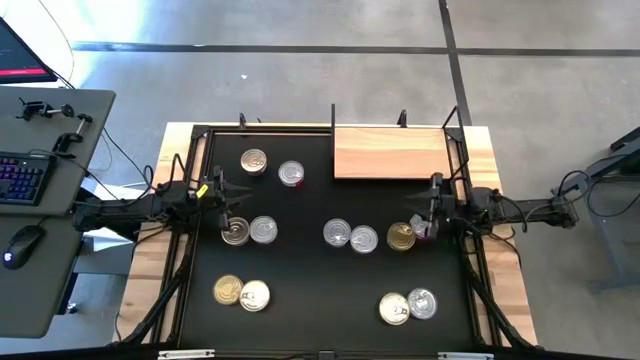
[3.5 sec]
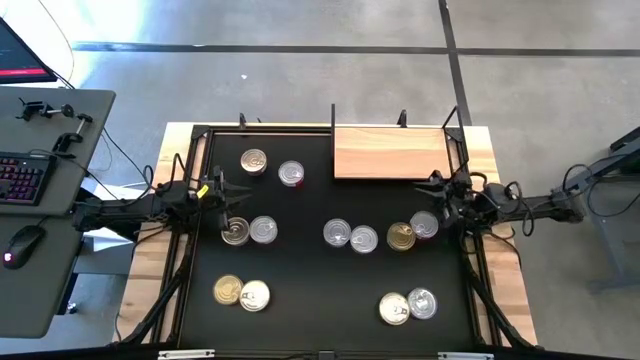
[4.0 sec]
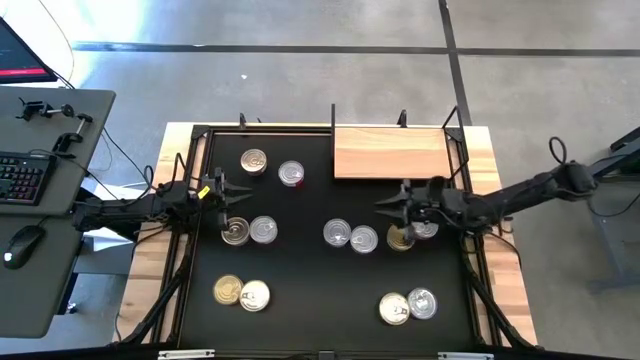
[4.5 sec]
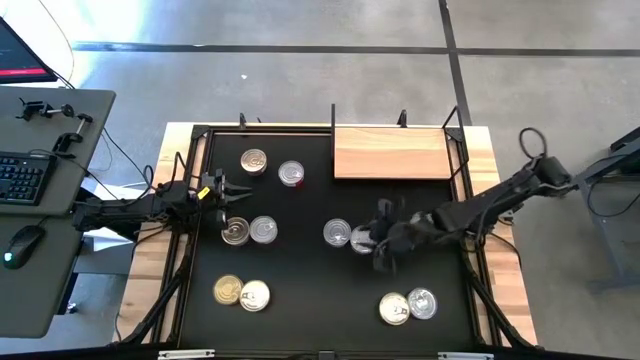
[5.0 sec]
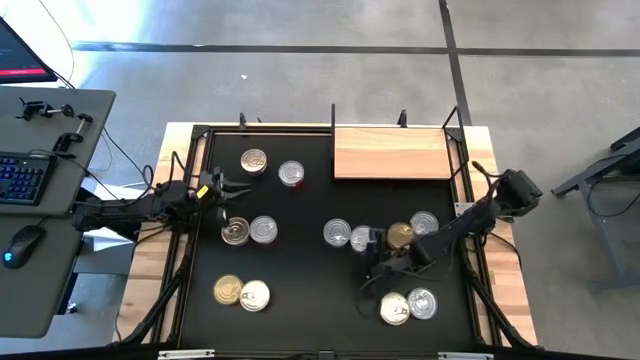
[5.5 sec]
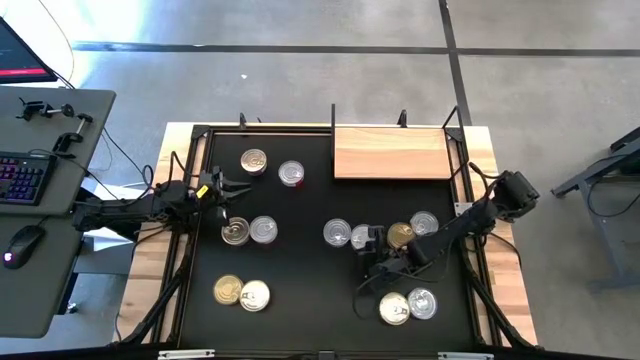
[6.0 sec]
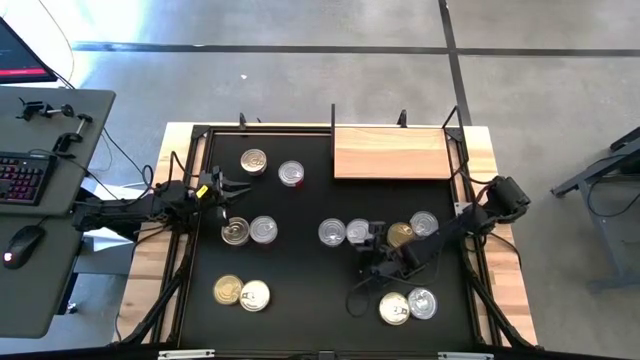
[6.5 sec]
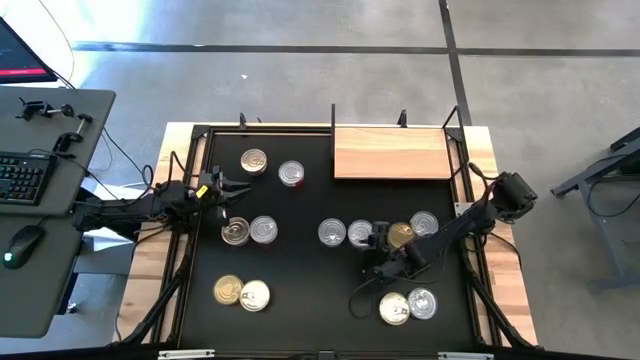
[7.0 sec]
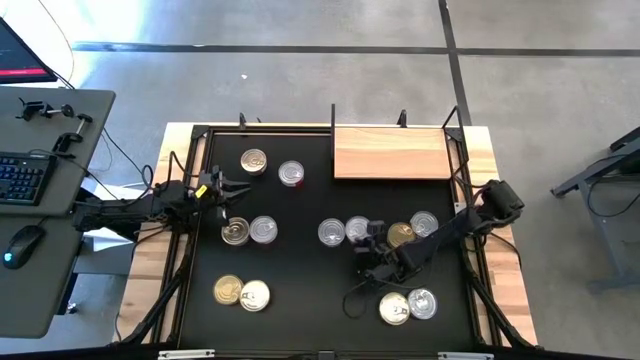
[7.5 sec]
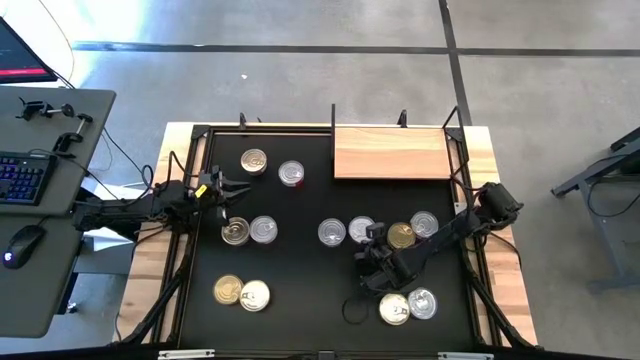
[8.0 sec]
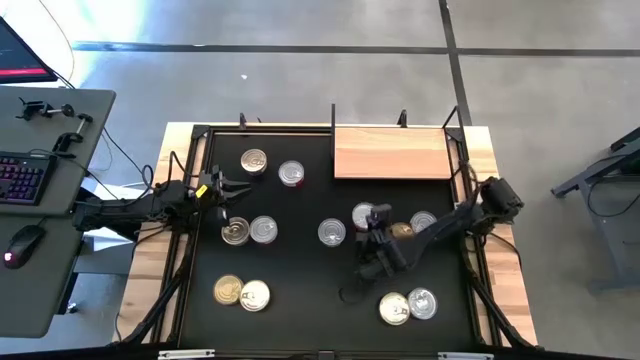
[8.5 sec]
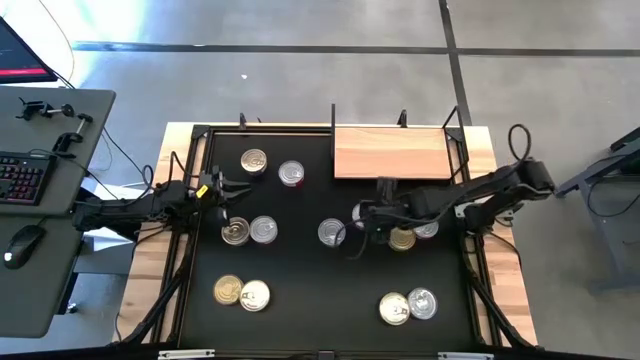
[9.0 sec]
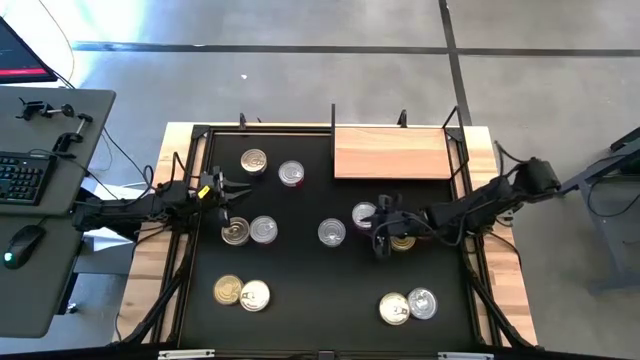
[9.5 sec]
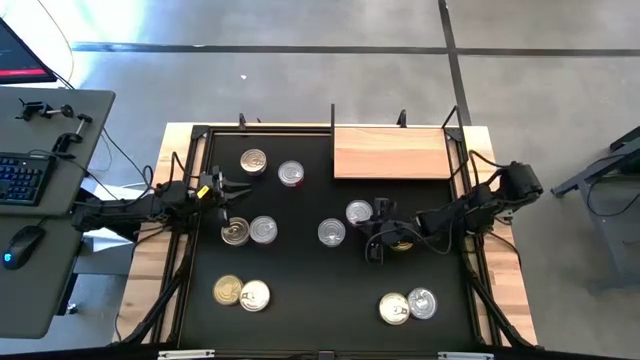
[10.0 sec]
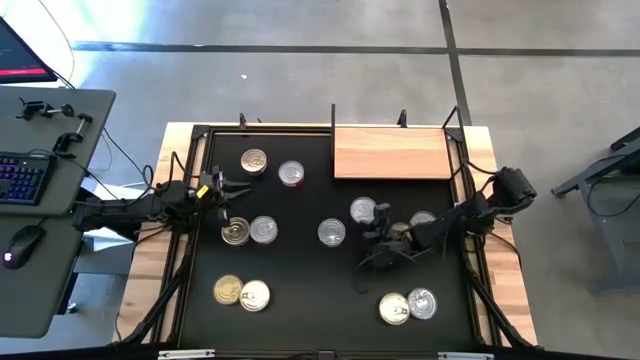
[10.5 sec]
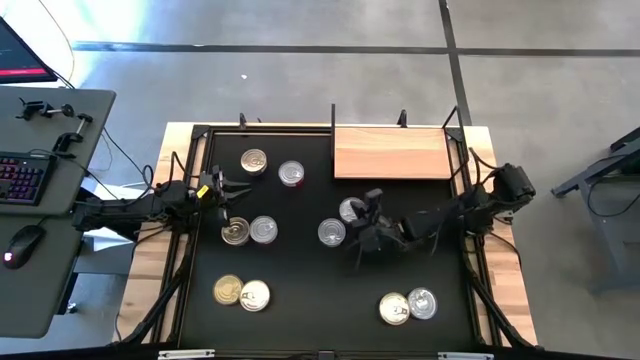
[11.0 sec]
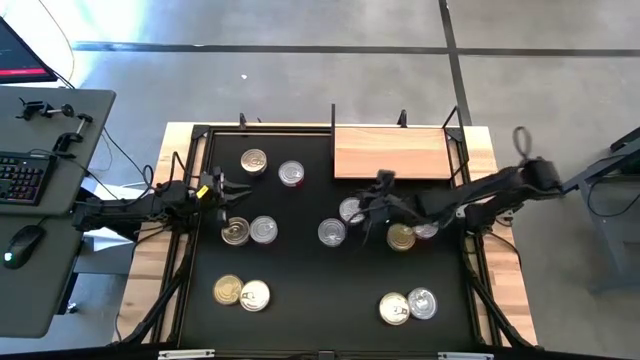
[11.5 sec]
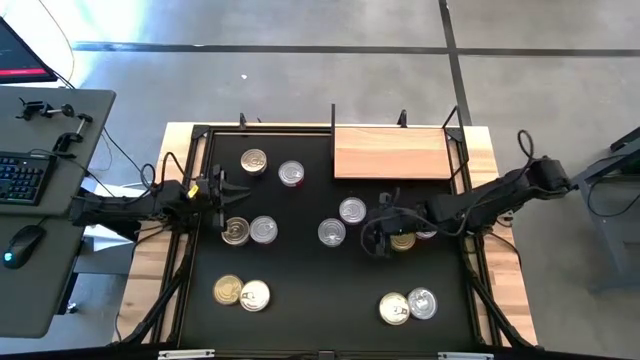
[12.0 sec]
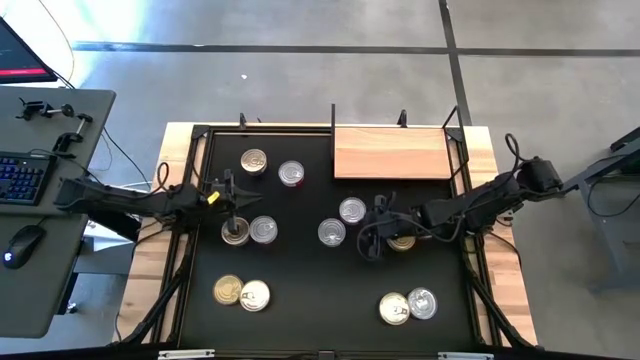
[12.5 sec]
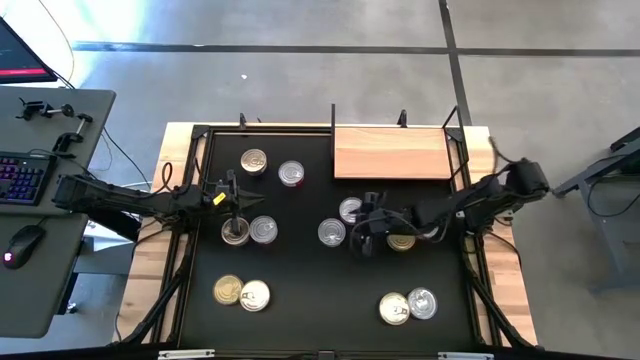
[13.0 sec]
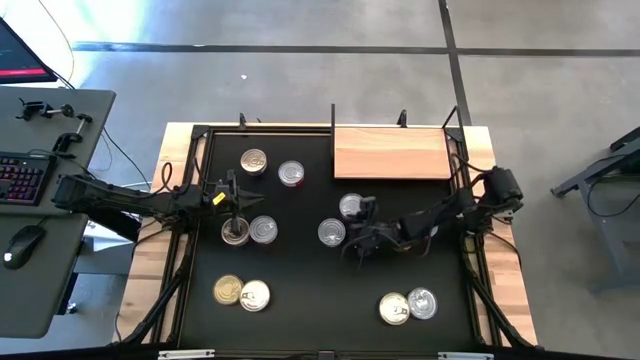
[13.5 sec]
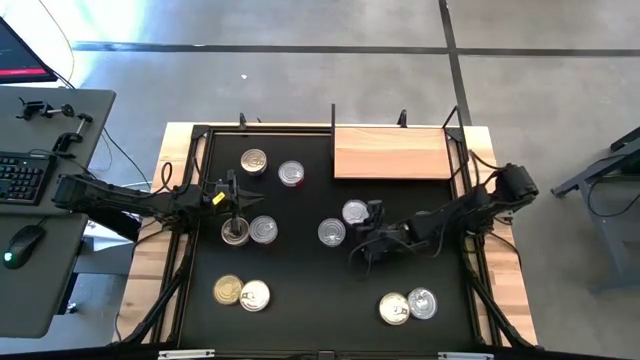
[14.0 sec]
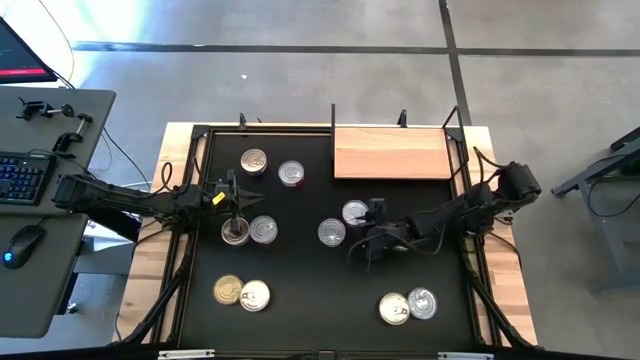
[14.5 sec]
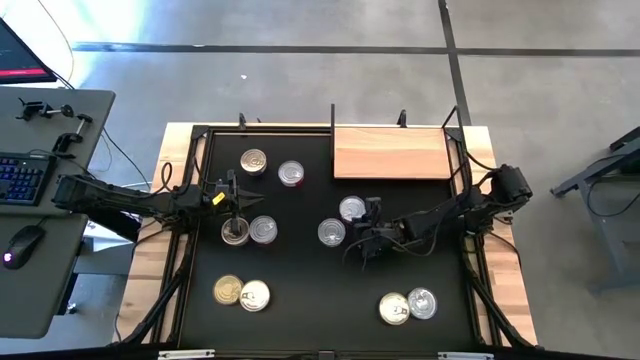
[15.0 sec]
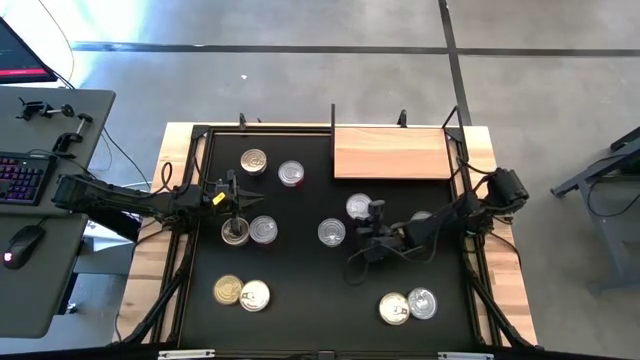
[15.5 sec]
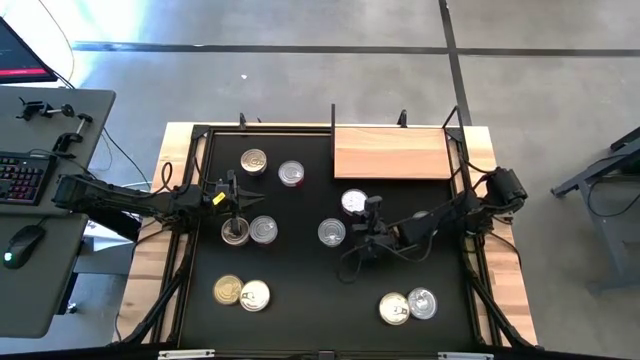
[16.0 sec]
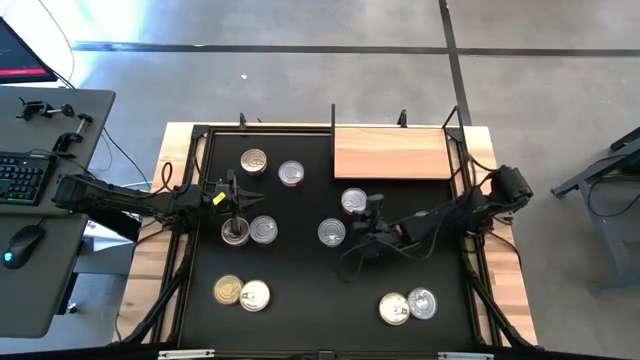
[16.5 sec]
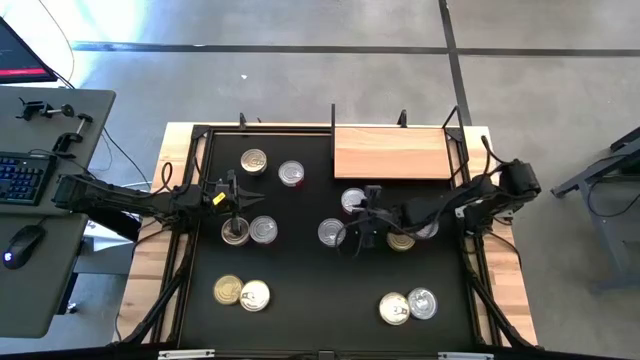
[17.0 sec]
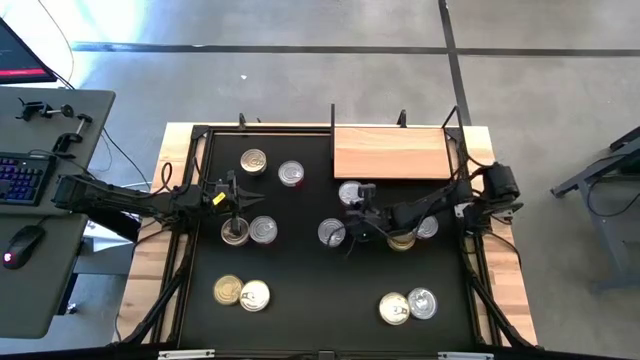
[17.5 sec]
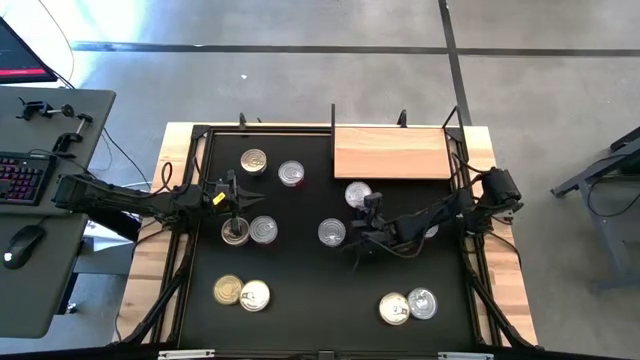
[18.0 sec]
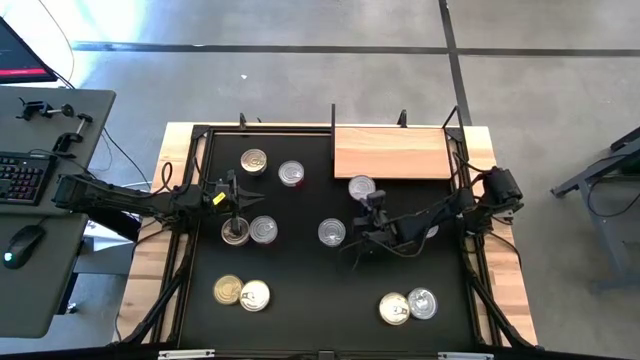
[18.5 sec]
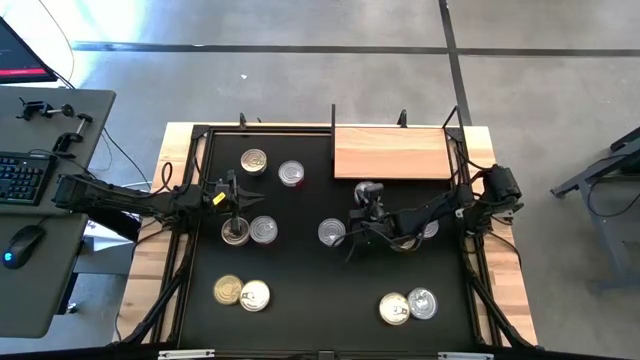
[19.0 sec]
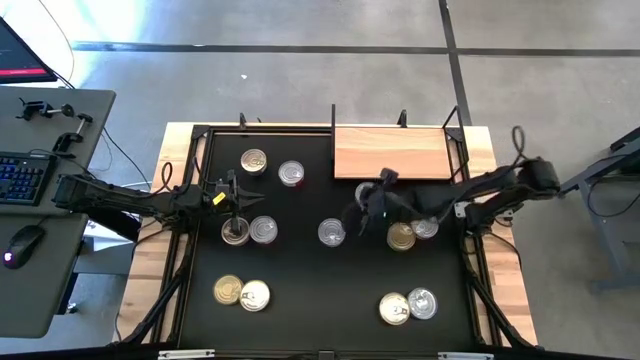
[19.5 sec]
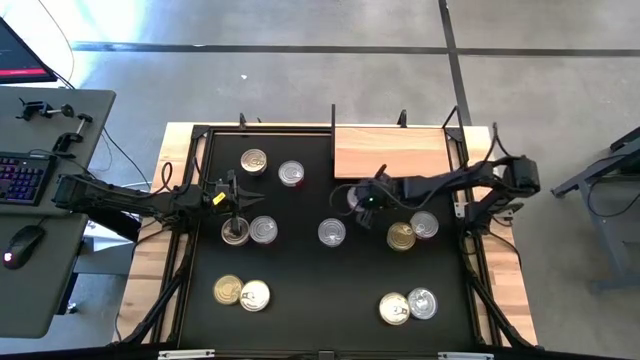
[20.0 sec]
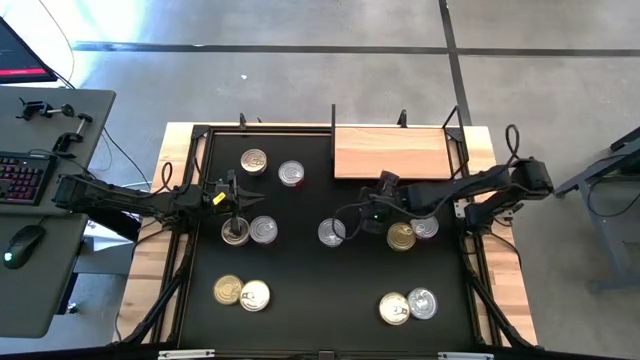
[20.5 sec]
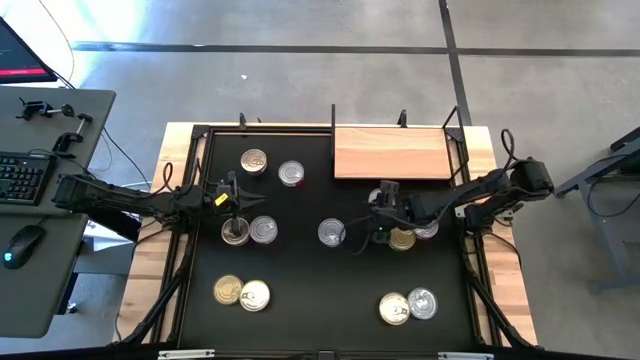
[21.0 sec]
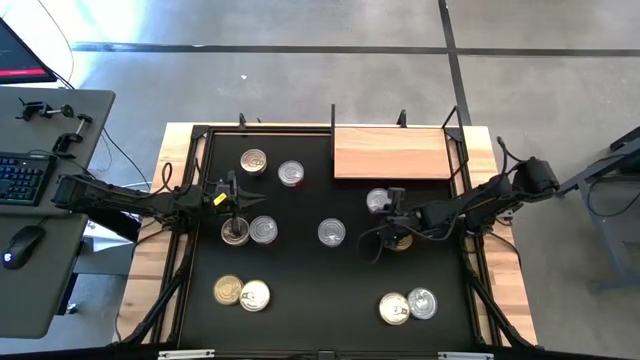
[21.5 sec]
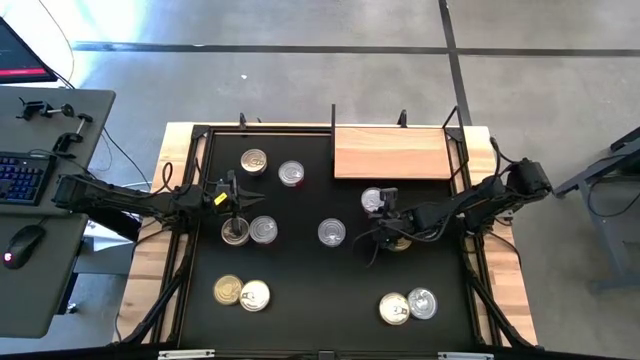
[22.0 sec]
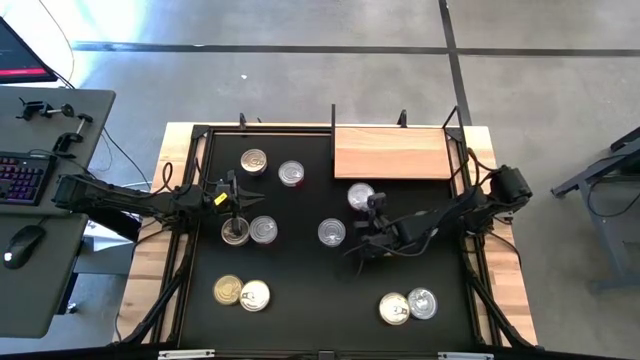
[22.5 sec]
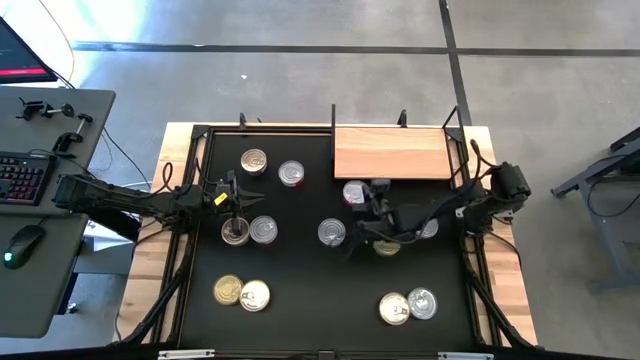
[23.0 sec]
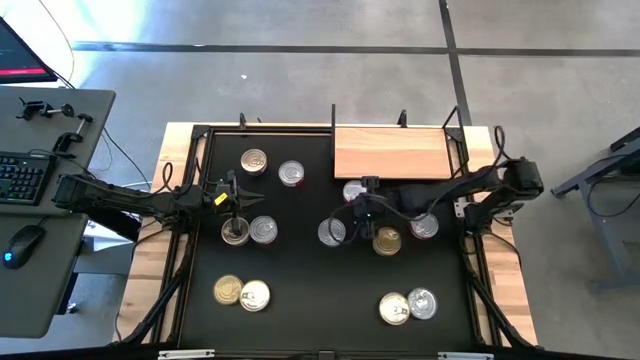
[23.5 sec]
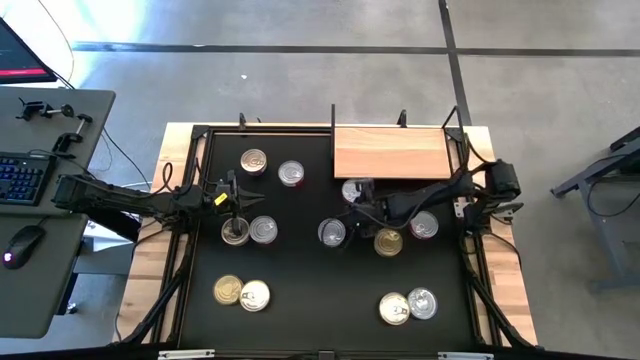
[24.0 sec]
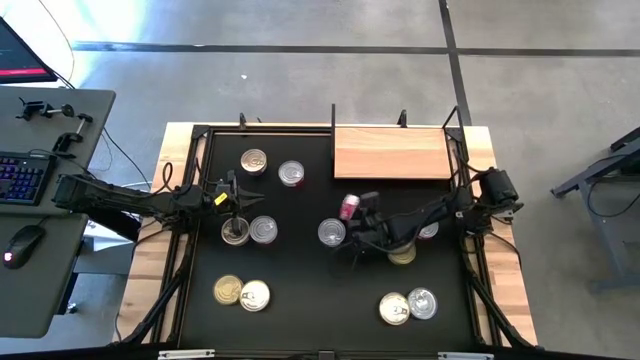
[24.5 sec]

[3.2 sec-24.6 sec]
Task: Stack canned seafood by type on shelf
Put the red tuna can on the shelf
